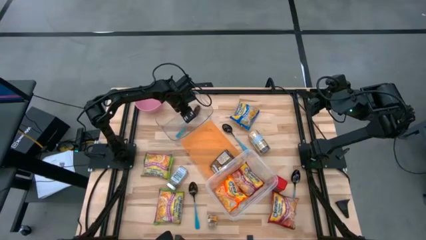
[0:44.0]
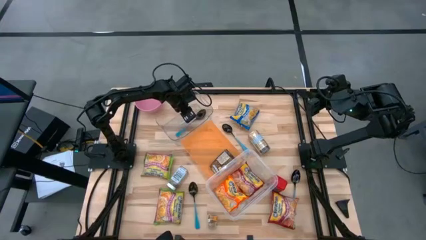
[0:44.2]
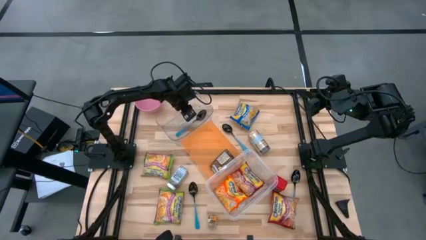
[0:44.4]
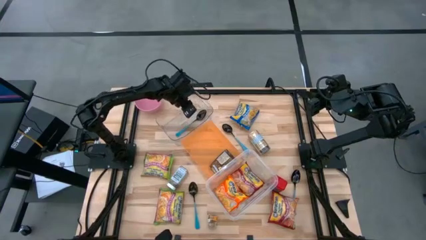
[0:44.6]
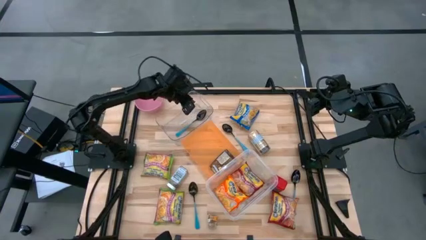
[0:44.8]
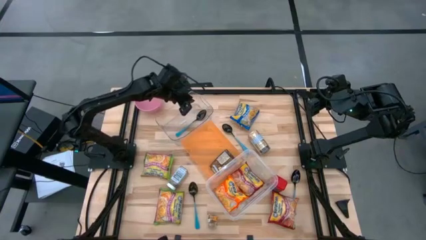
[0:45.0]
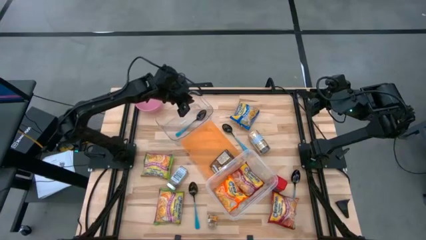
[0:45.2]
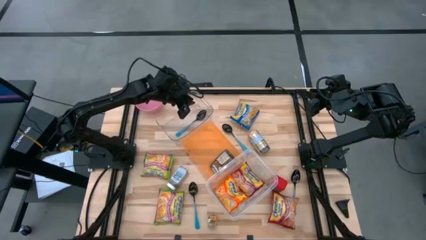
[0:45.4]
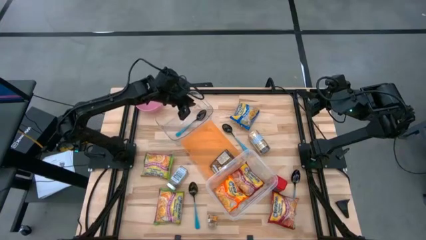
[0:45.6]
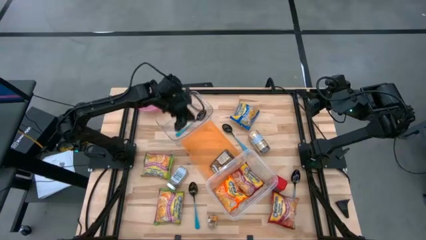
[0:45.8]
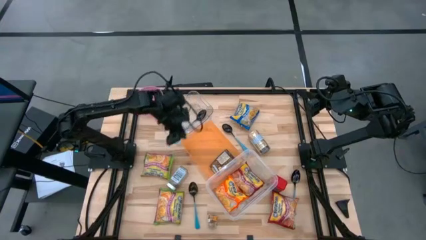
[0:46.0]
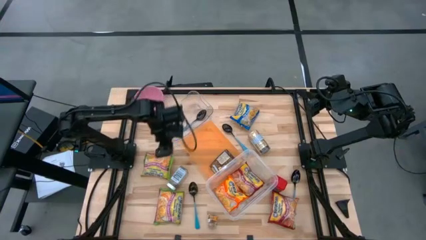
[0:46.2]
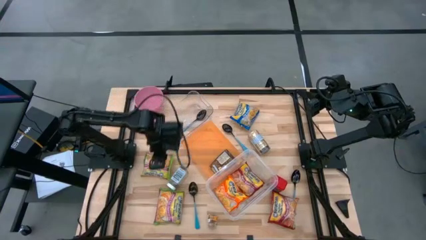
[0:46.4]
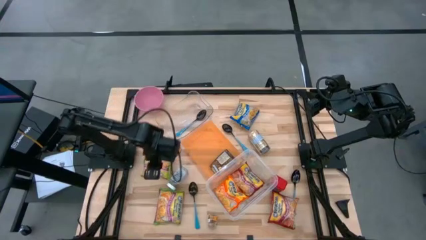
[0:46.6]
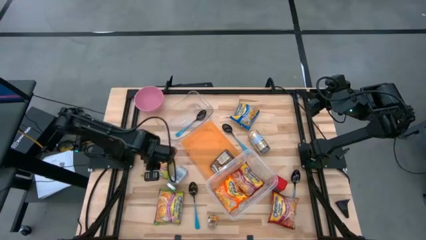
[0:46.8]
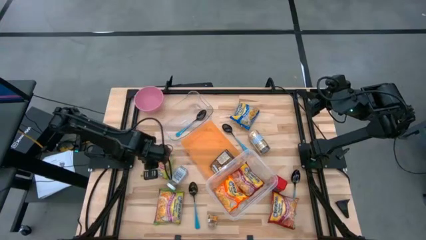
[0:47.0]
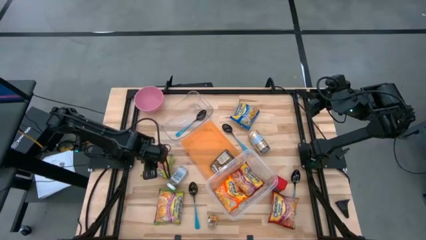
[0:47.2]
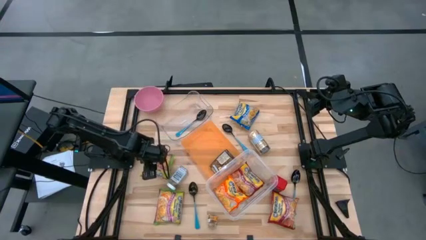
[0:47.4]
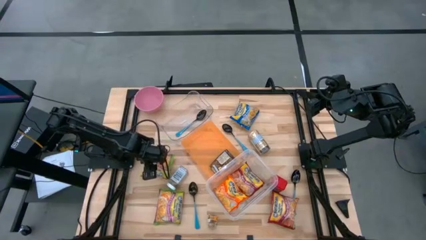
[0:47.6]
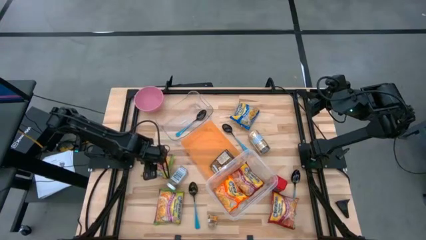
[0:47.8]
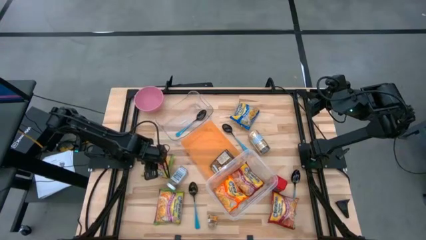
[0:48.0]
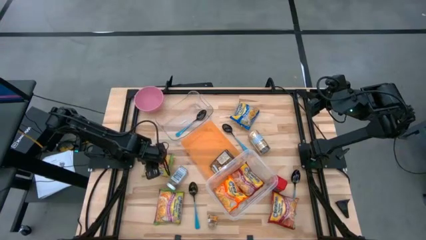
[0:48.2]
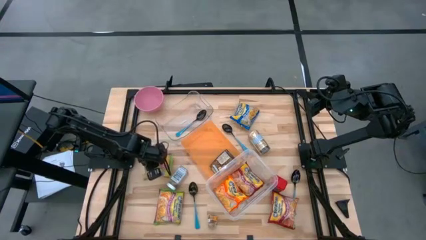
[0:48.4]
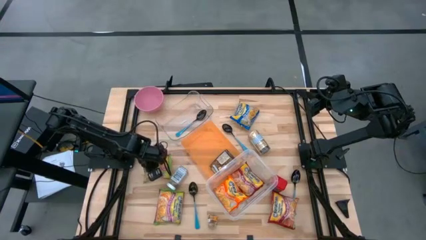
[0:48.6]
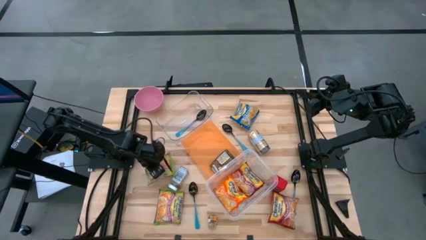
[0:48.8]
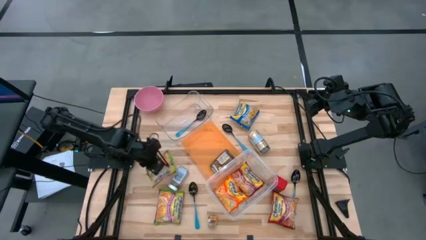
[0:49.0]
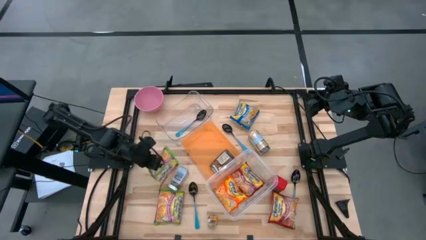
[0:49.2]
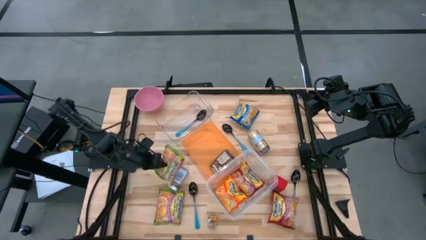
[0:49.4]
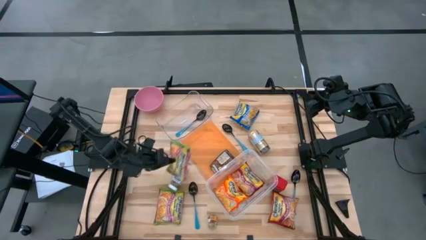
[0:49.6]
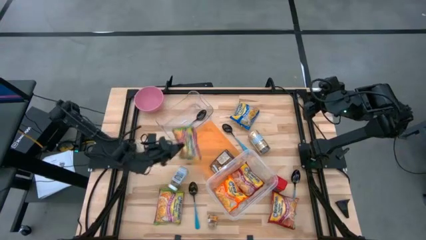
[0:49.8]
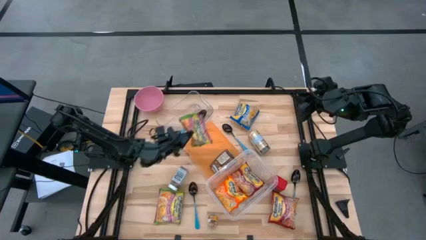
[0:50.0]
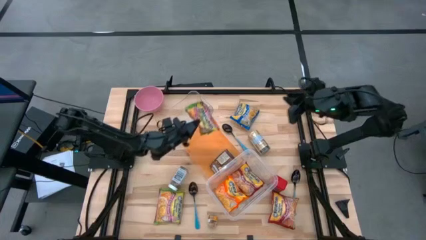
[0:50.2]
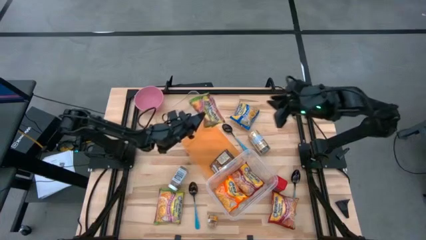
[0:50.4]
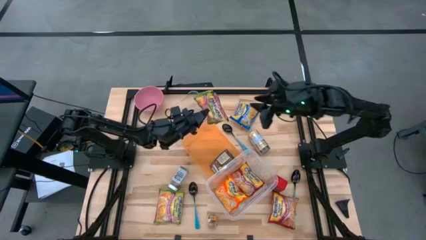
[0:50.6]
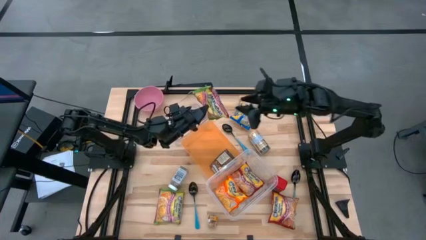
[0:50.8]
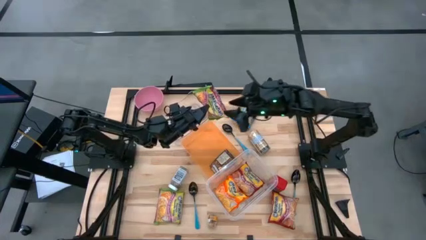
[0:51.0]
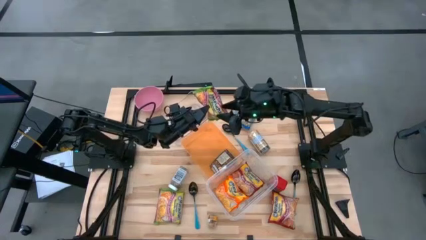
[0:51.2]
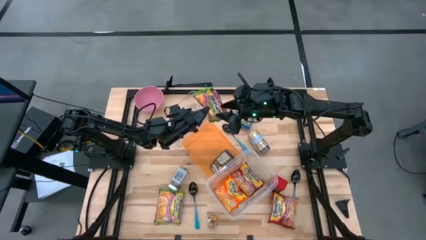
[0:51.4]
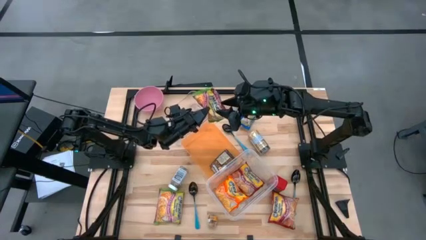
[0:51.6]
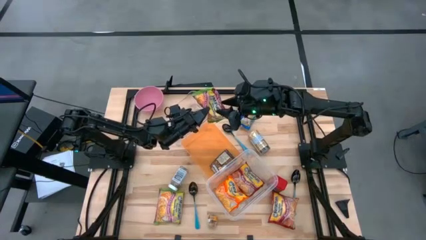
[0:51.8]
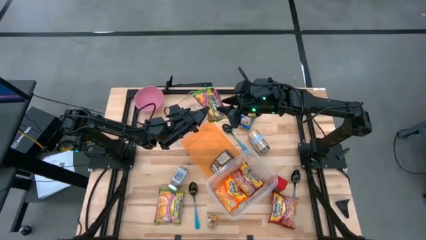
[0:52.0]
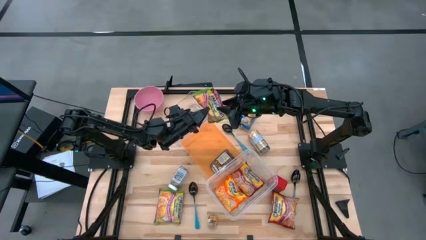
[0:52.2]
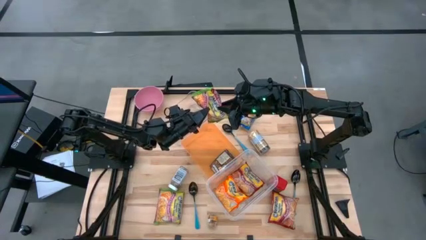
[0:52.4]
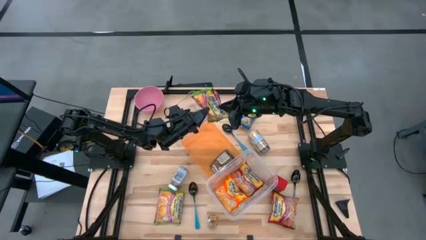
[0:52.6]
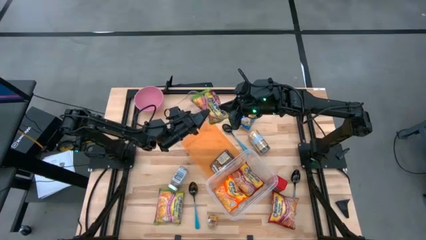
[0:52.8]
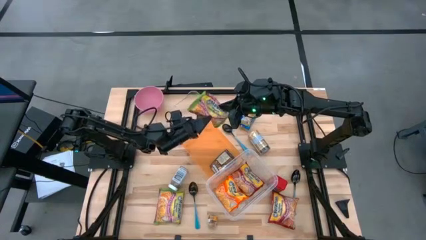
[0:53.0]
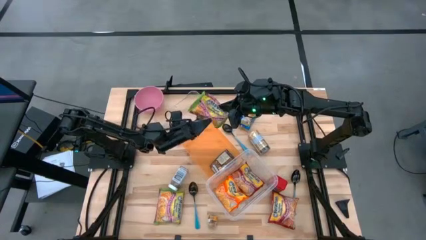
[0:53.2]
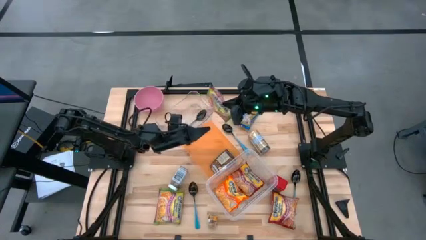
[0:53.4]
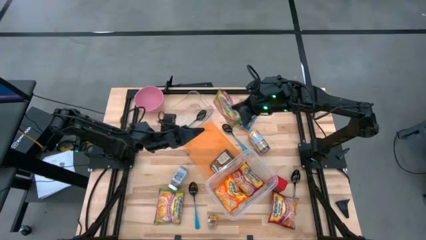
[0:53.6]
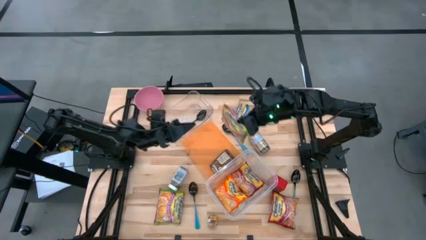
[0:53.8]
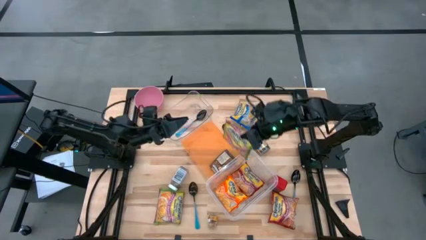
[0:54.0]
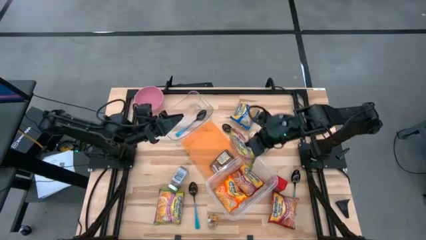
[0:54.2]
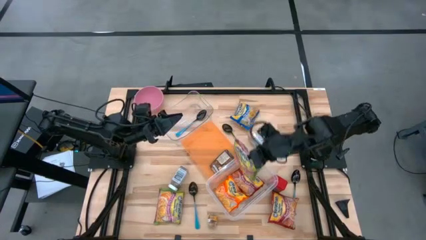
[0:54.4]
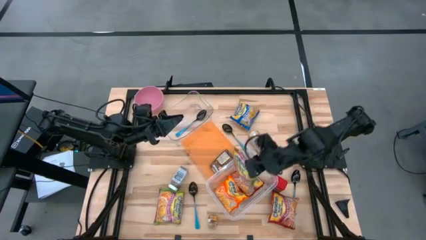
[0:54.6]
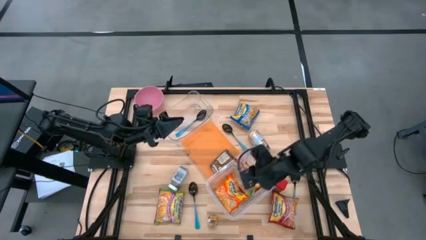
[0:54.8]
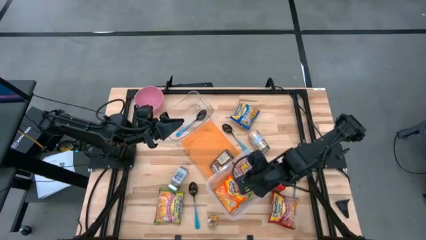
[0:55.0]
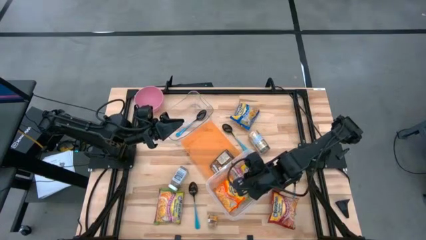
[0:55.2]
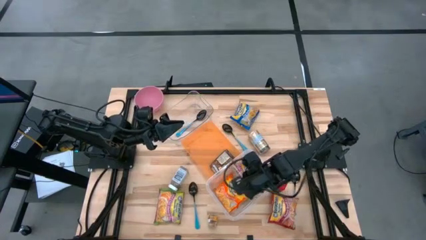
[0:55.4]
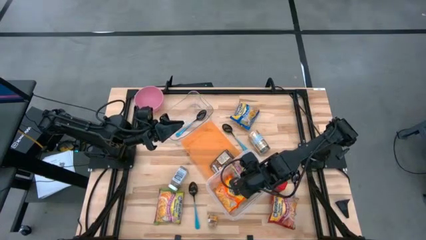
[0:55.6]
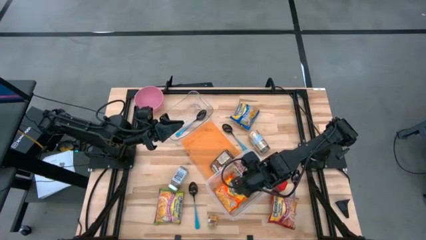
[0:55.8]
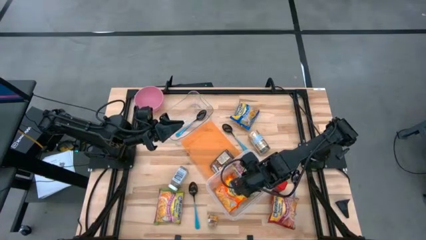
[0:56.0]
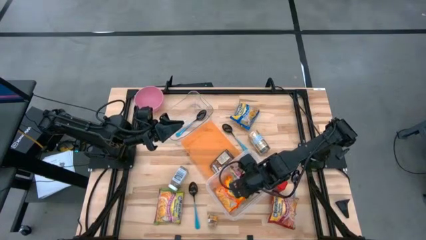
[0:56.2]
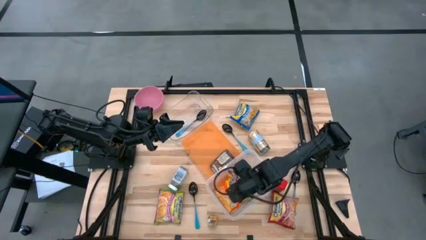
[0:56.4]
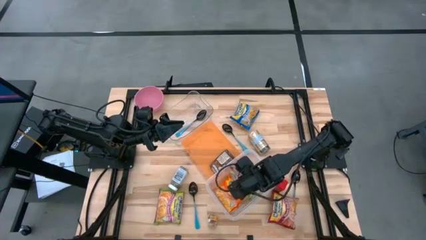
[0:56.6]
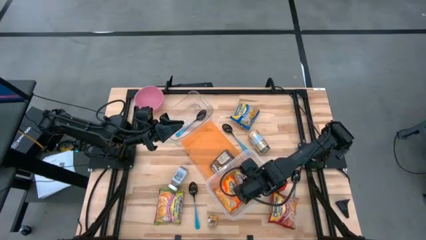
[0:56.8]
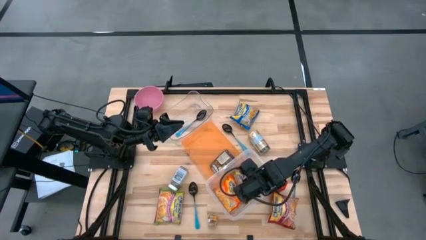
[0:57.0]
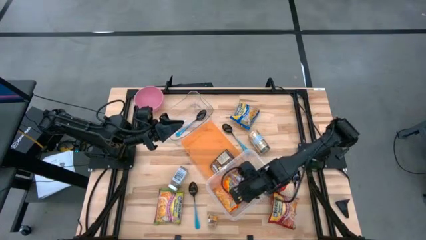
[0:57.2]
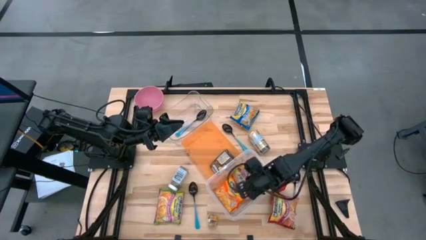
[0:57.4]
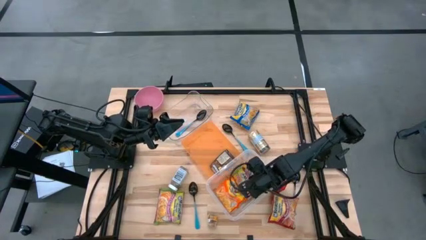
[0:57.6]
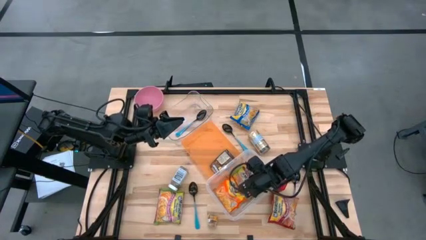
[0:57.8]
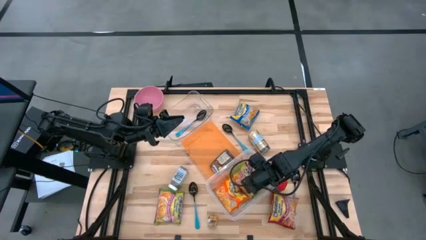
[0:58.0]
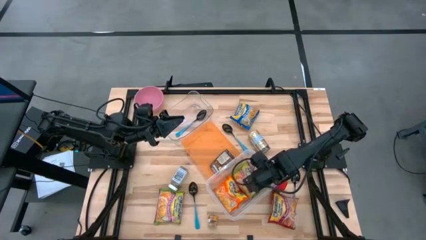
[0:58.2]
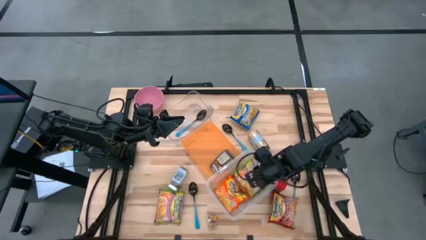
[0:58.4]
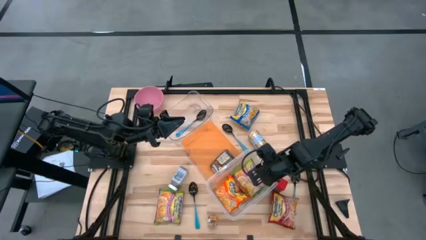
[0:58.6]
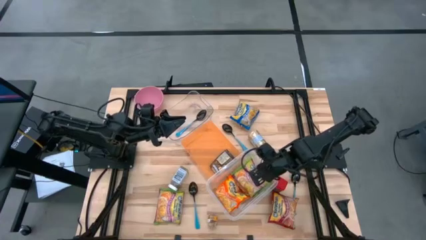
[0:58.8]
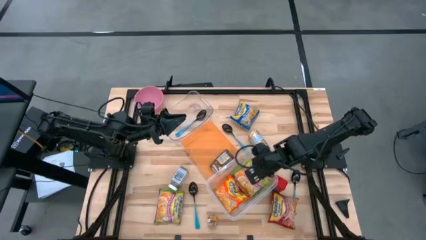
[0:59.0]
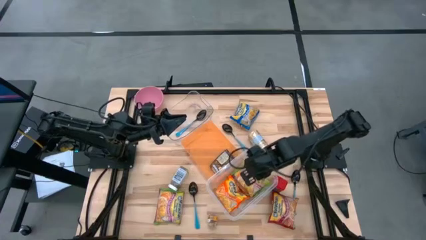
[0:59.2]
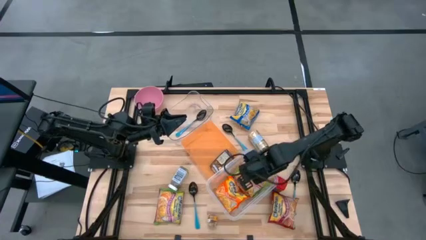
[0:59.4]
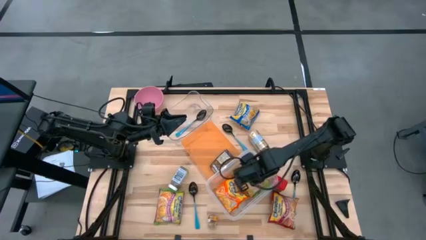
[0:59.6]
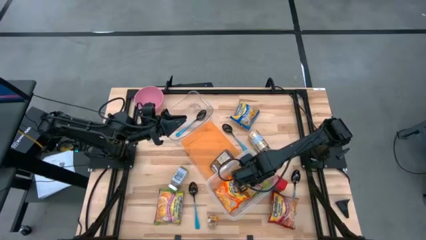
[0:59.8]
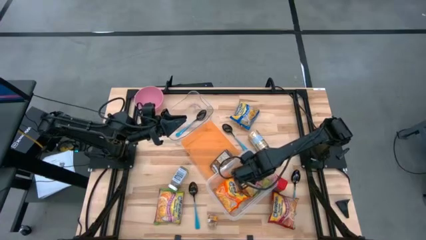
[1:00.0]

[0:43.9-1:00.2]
Task: Pick & Place Food Item
Put the green noodle pack into the bottom transparent bin
